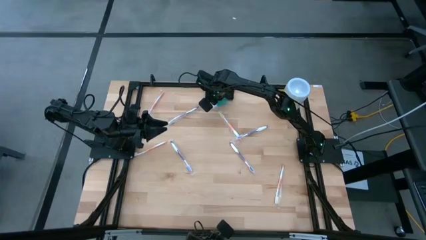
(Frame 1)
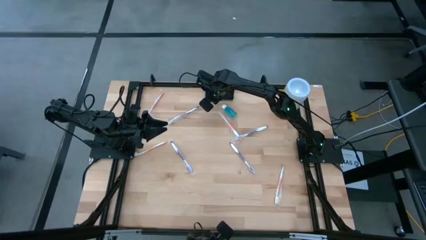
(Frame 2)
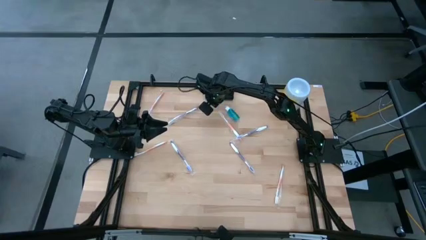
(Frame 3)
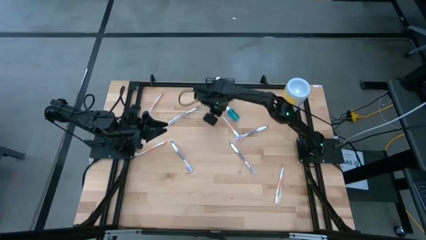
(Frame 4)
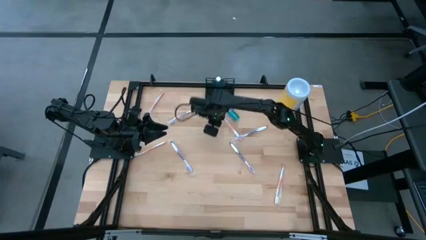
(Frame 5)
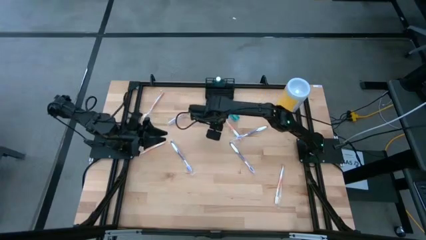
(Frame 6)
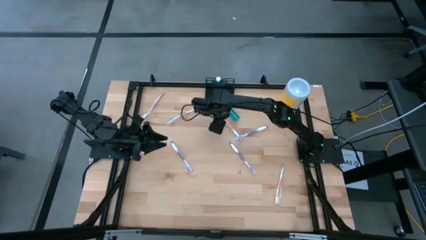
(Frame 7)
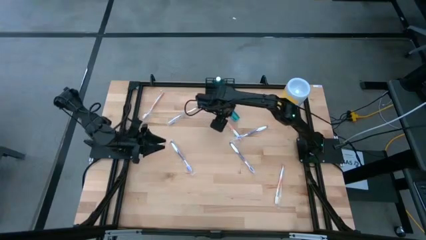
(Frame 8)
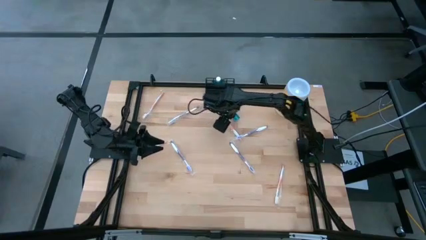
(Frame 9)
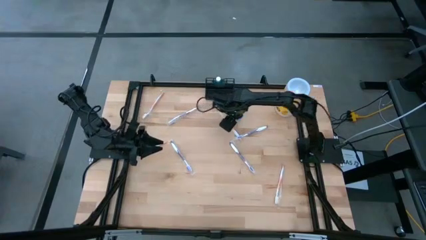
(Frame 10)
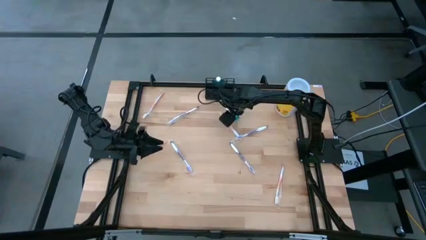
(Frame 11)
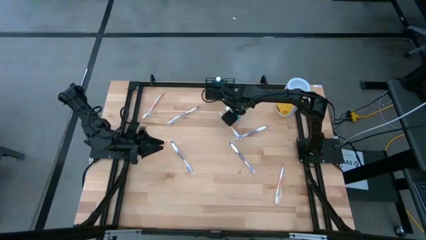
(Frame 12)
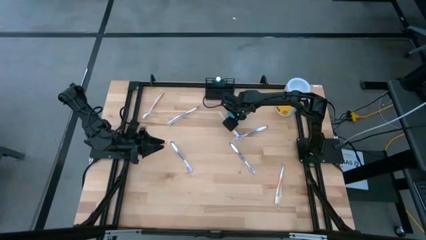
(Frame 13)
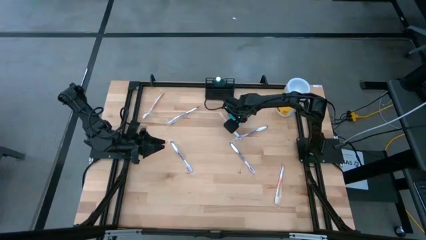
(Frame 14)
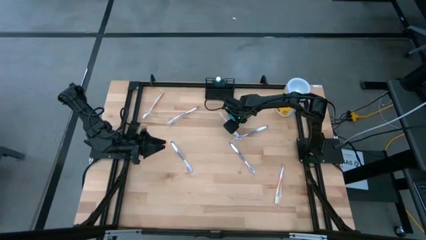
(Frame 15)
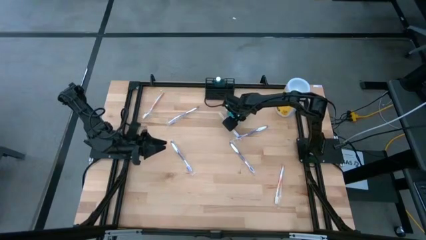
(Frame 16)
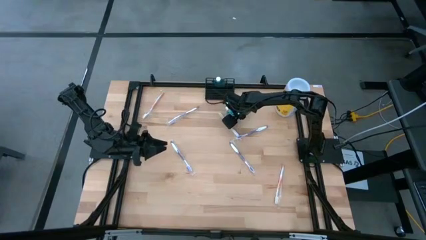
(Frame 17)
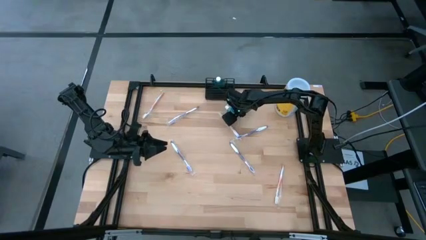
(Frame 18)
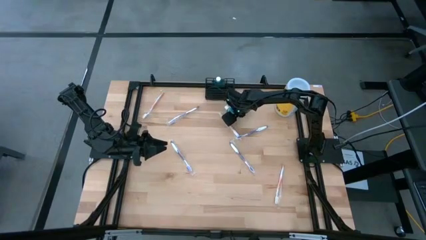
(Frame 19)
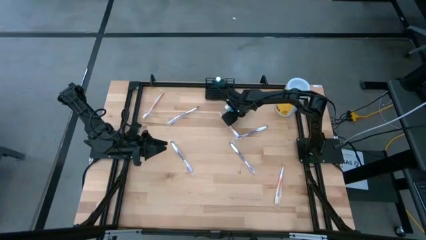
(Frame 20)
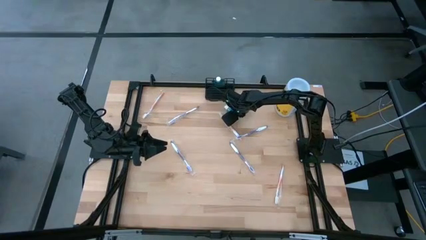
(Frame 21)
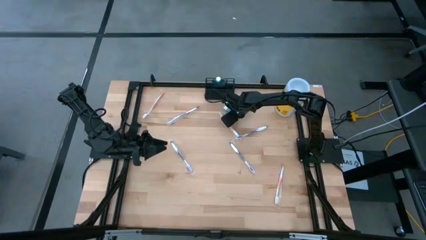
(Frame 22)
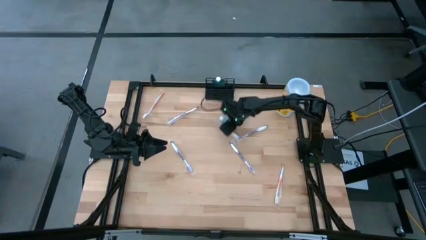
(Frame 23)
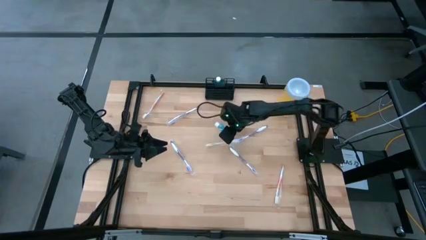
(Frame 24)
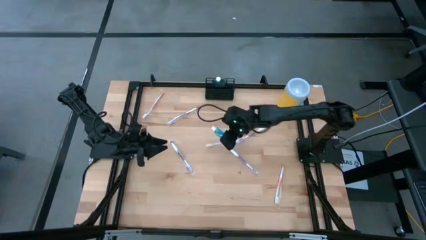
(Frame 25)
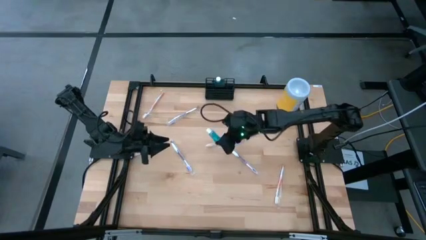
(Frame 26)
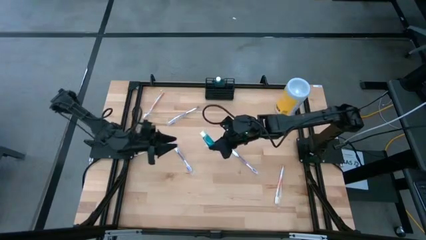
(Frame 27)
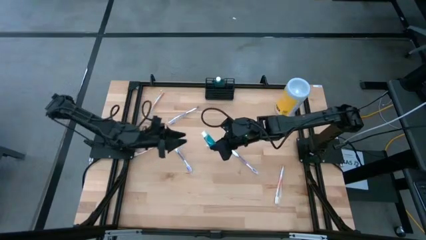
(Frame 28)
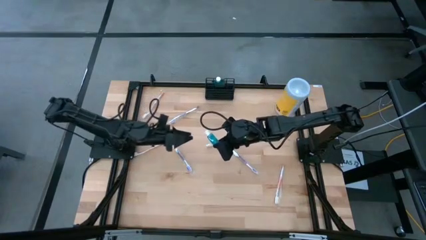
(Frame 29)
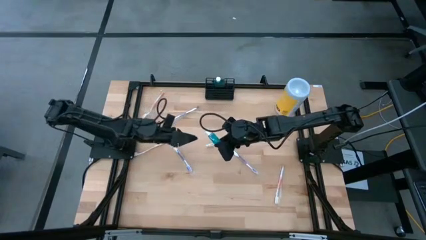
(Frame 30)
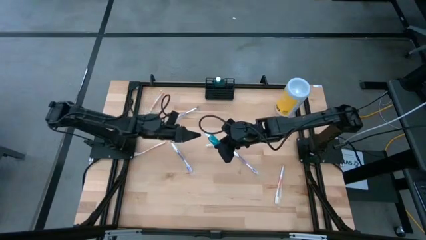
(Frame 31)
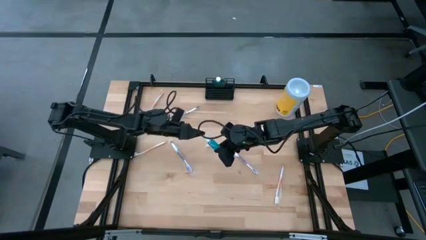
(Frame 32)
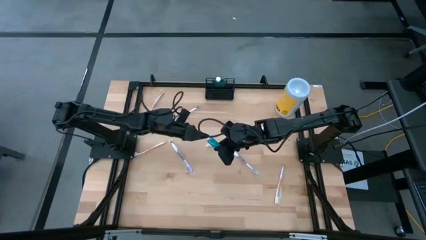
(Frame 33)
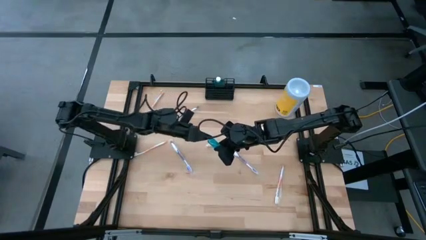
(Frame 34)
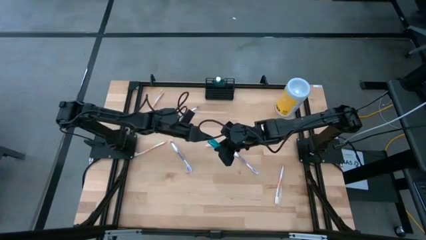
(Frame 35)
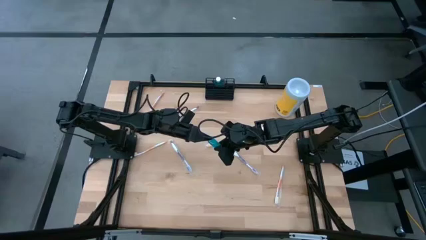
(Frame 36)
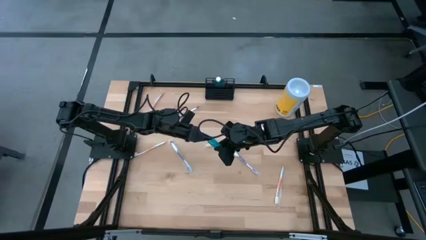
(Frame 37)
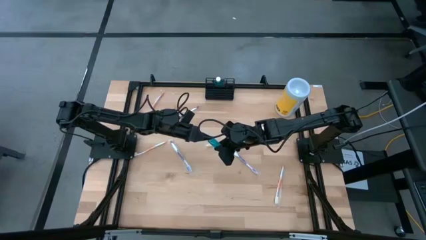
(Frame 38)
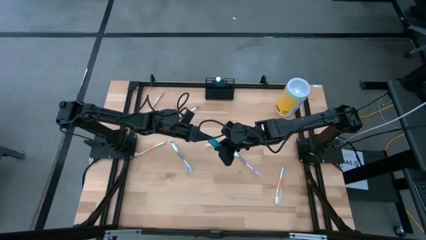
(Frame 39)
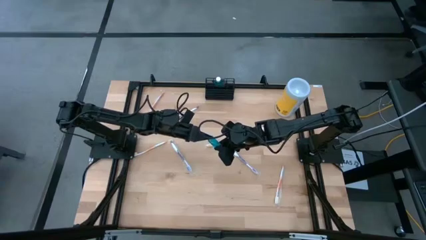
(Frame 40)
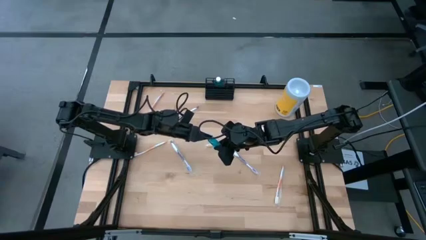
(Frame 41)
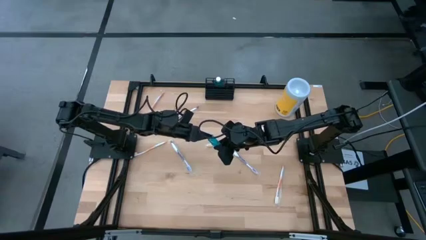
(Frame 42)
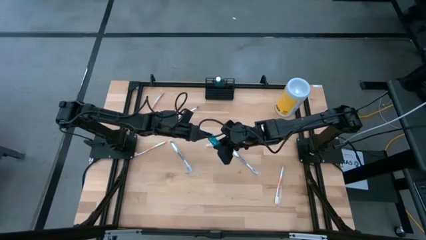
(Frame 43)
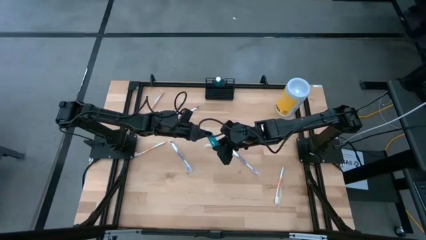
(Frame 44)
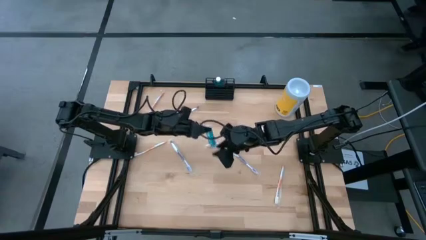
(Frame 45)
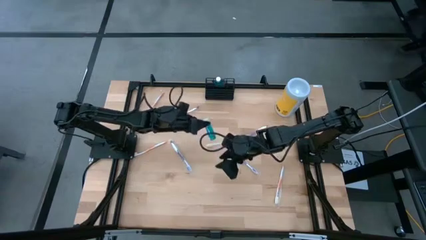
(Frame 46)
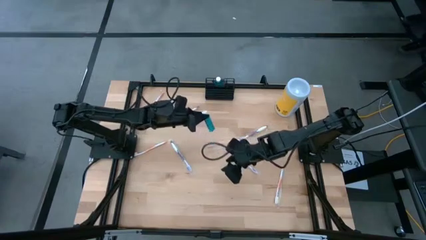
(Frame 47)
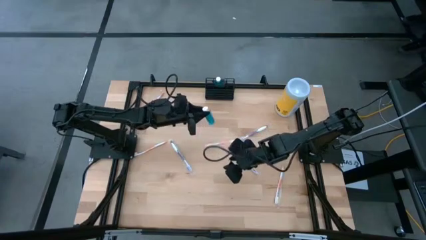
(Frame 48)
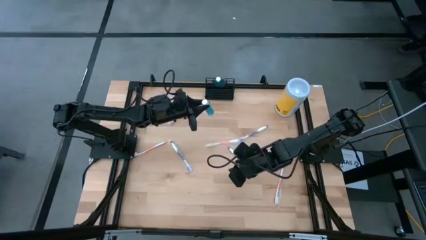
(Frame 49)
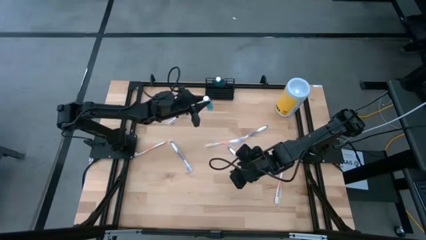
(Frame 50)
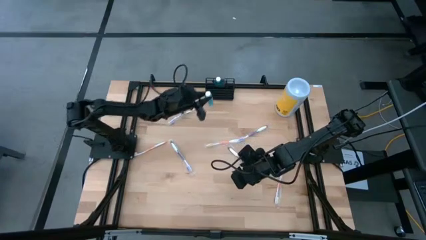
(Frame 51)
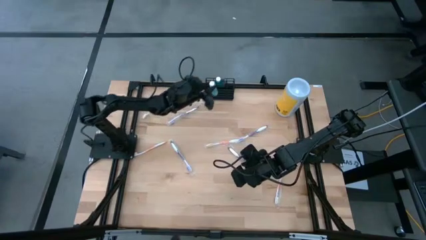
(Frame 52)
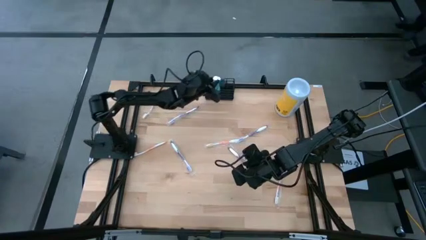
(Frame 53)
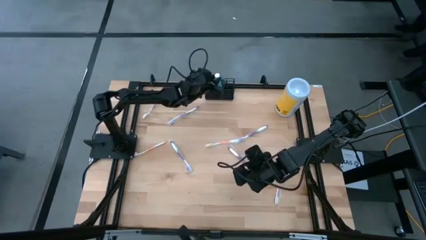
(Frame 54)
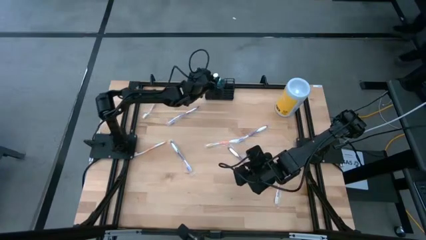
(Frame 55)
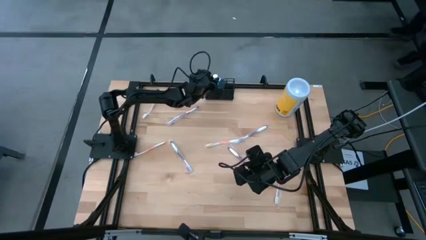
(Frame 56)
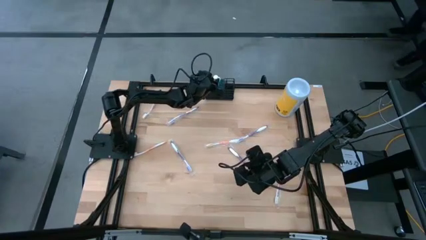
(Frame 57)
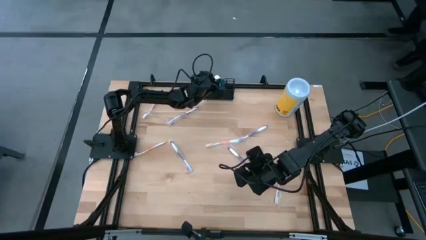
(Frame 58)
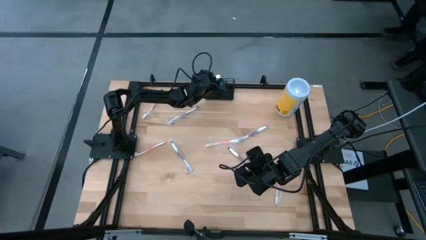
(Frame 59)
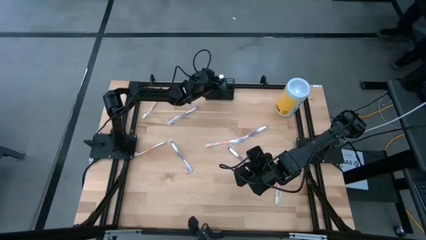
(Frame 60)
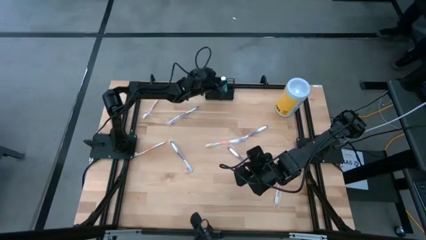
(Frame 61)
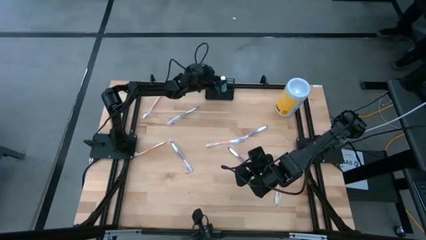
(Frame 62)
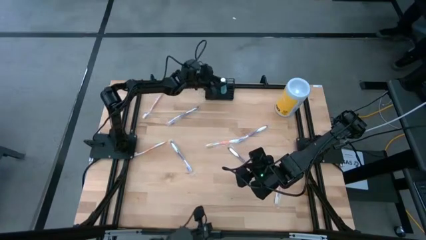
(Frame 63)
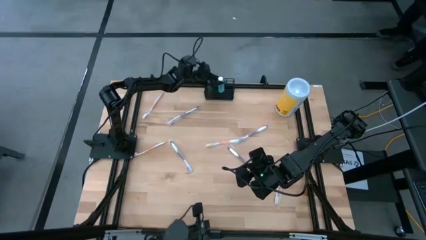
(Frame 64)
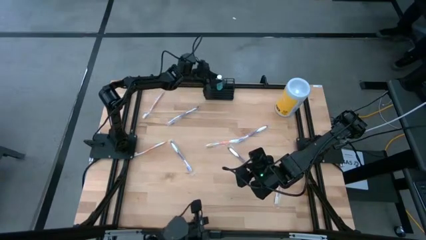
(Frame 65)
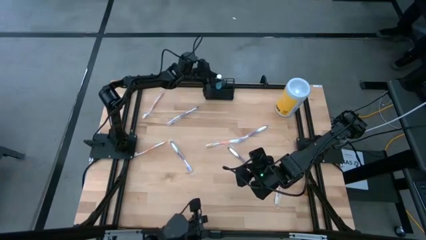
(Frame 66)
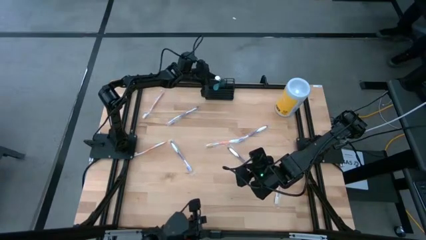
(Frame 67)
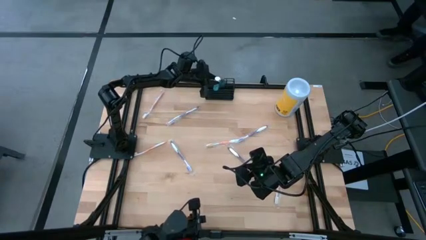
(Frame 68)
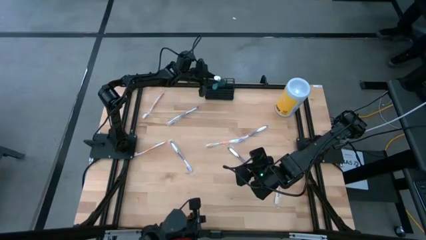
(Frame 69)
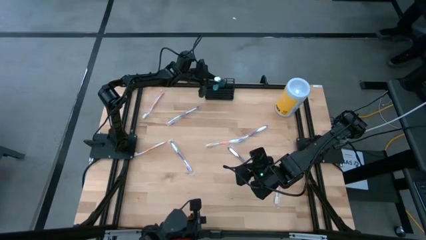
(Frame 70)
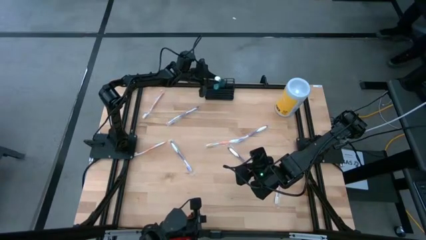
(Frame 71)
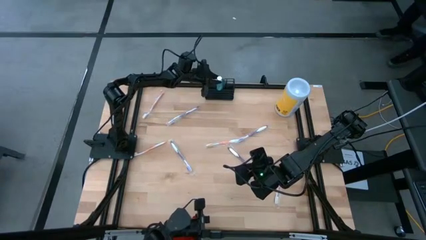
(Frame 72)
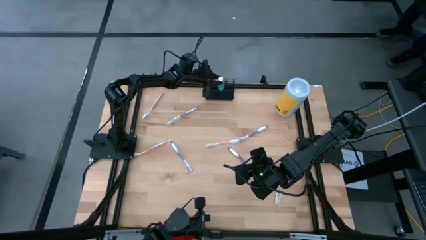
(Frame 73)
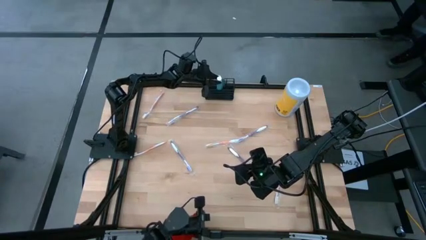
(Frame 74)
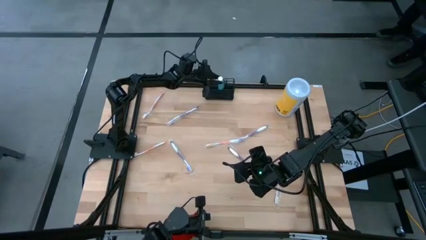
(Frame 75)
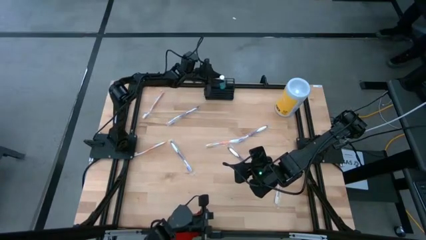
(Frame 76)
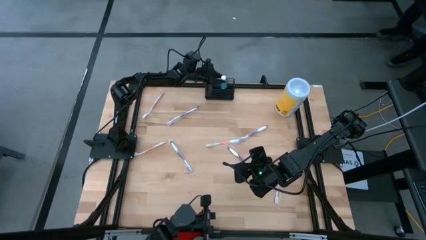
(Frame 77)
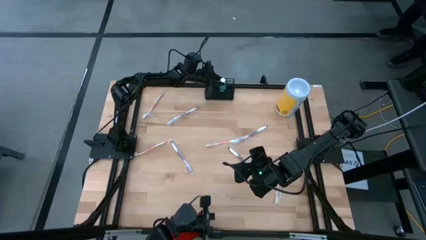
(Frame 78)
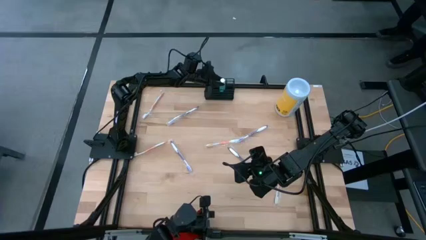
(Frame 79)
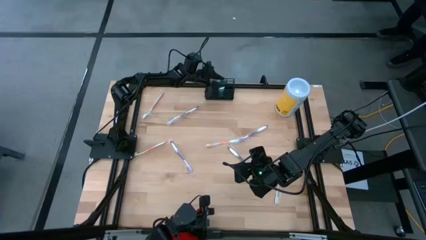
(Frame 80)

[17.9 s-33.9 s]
Task: Pick & Place toothbrushing station
Put the blue mouthwash into the black wire organizer bin
